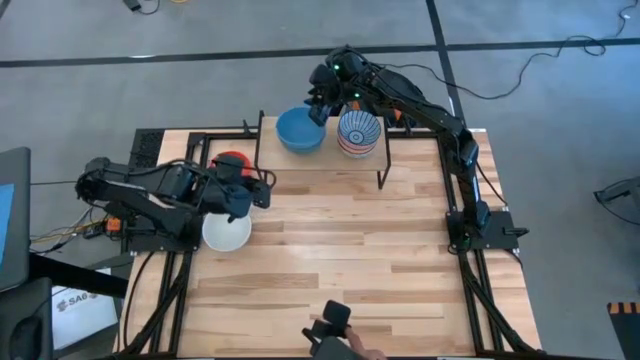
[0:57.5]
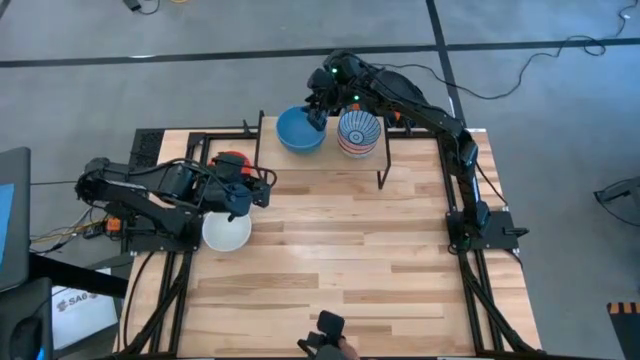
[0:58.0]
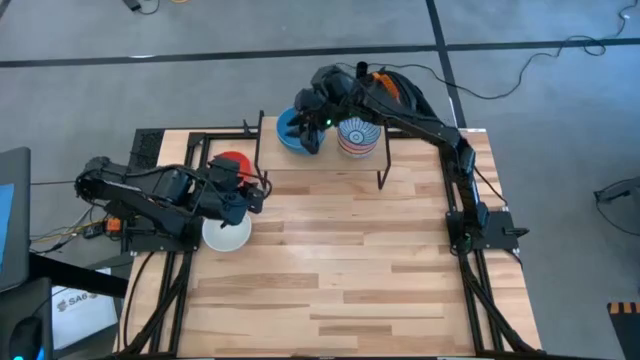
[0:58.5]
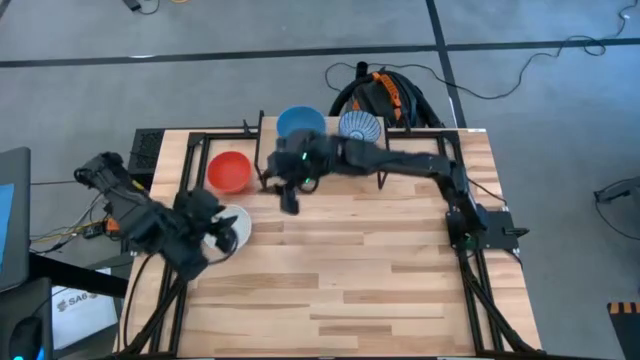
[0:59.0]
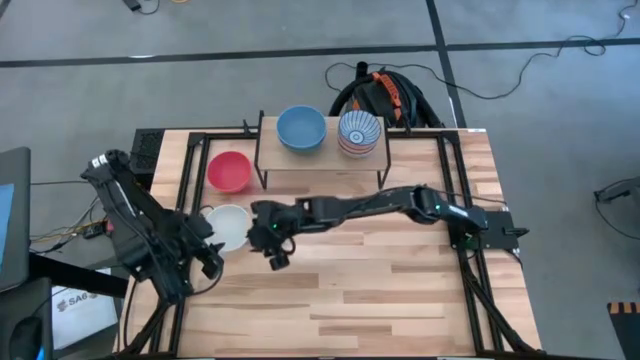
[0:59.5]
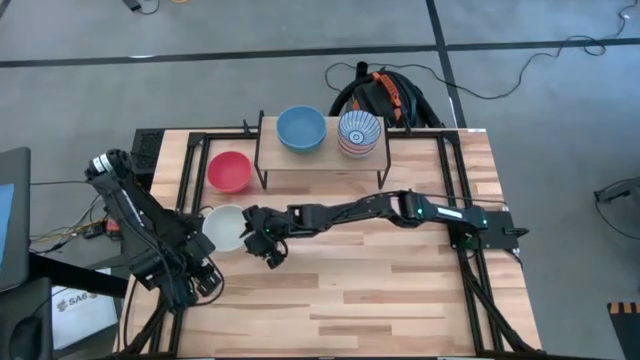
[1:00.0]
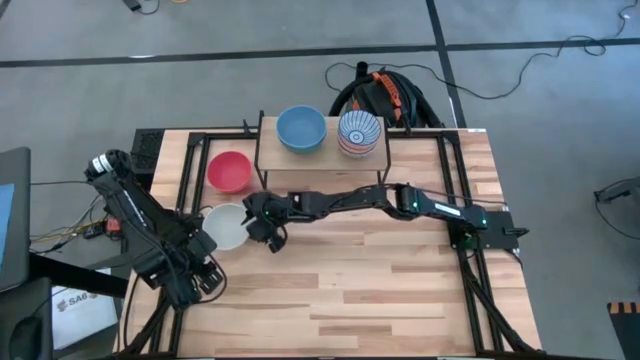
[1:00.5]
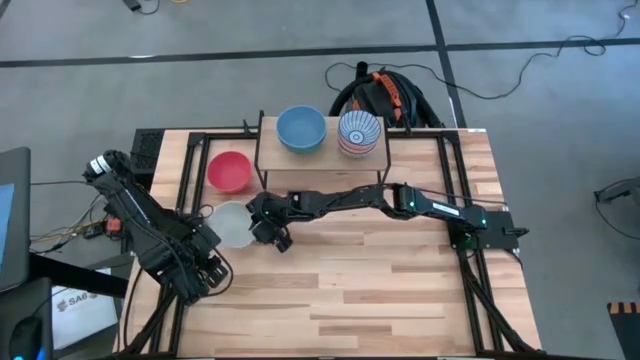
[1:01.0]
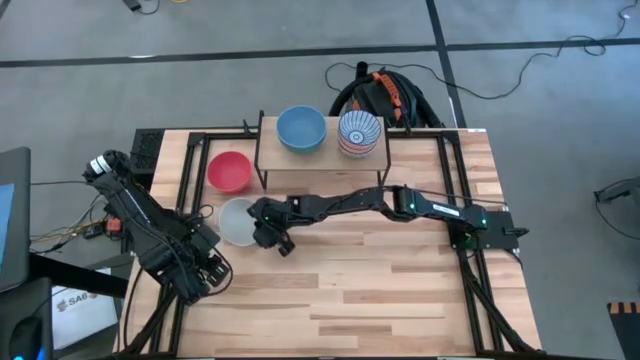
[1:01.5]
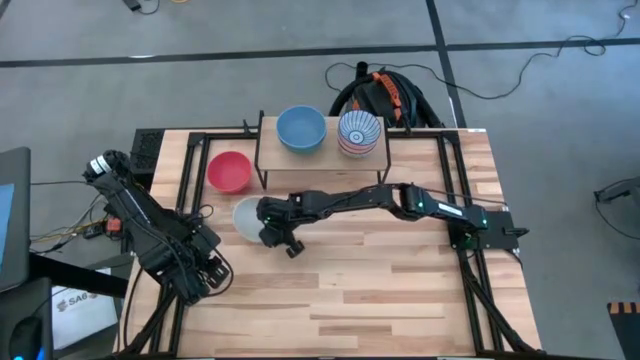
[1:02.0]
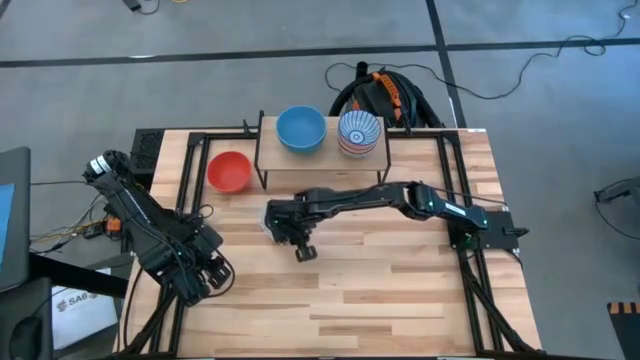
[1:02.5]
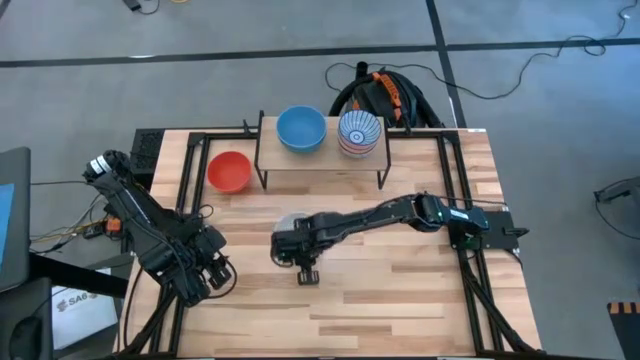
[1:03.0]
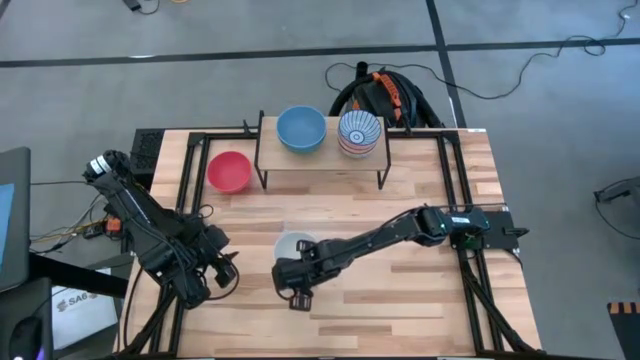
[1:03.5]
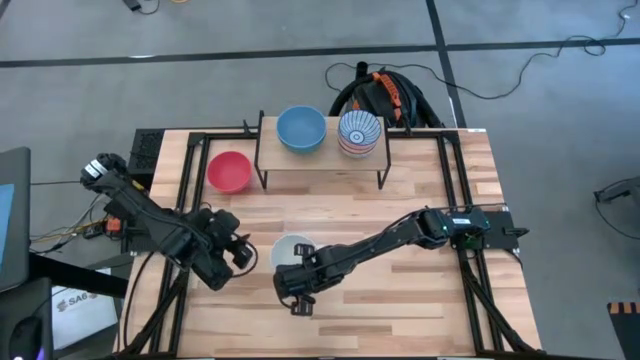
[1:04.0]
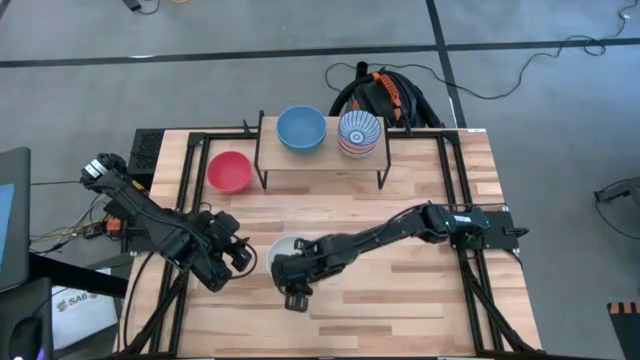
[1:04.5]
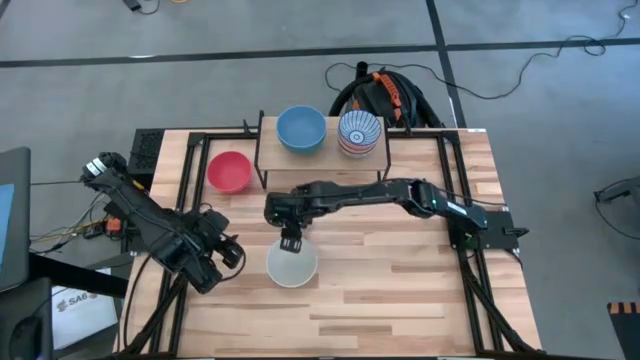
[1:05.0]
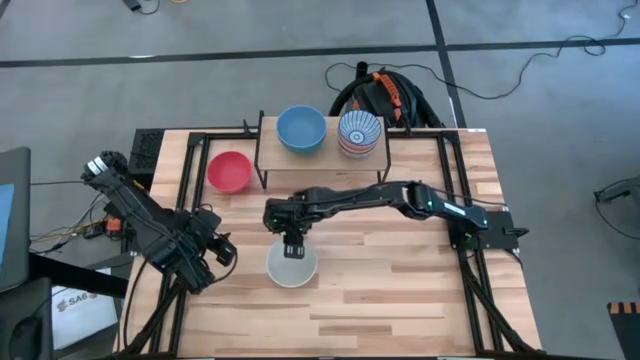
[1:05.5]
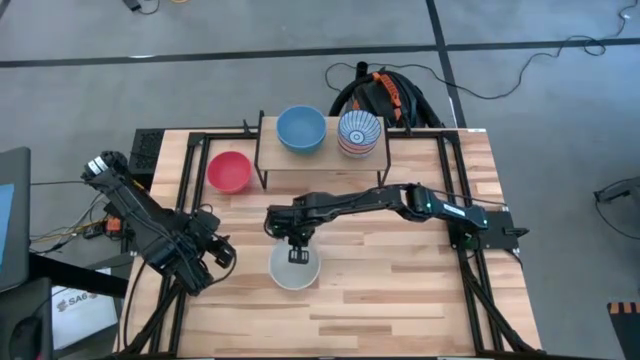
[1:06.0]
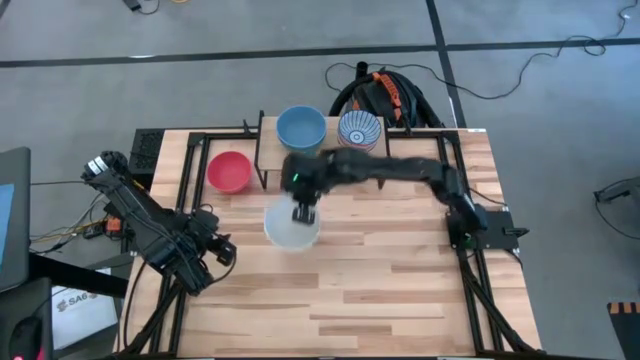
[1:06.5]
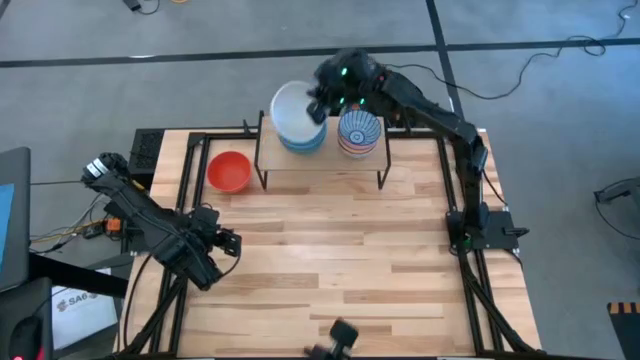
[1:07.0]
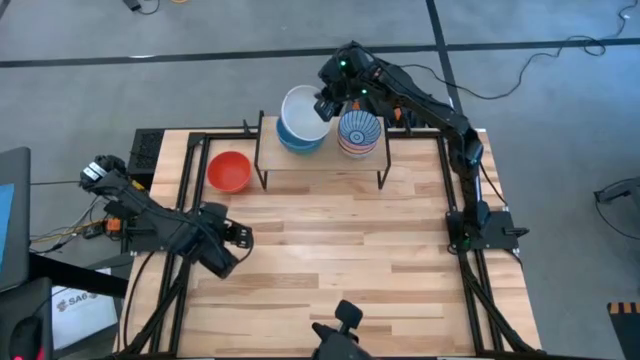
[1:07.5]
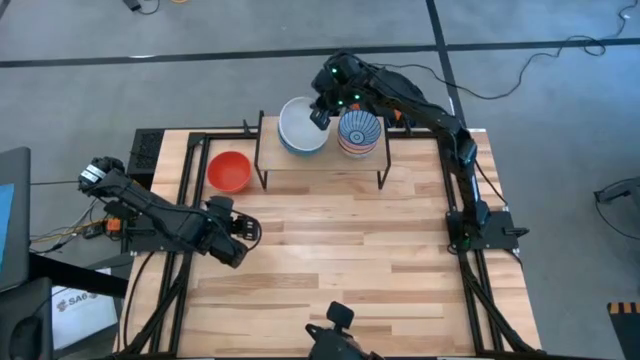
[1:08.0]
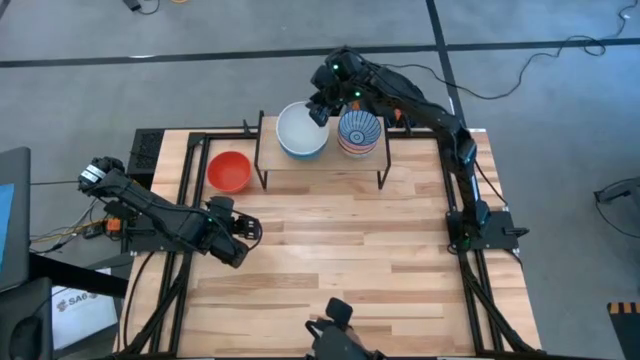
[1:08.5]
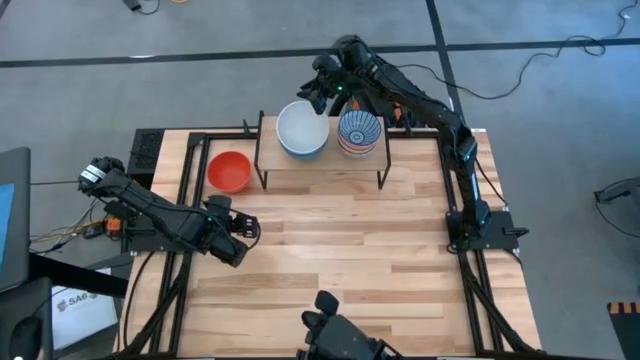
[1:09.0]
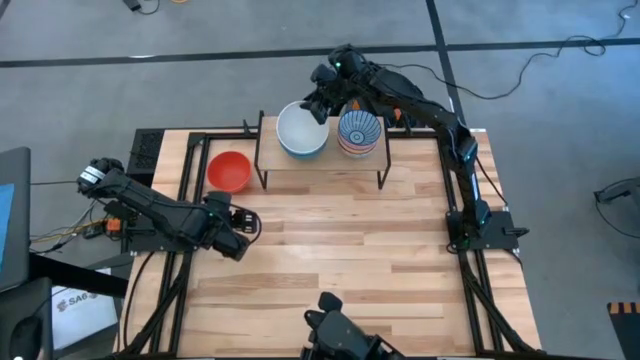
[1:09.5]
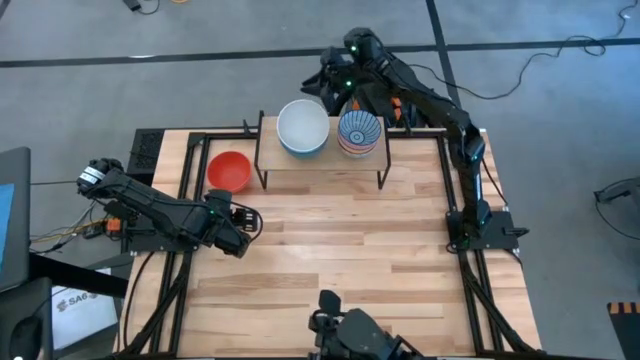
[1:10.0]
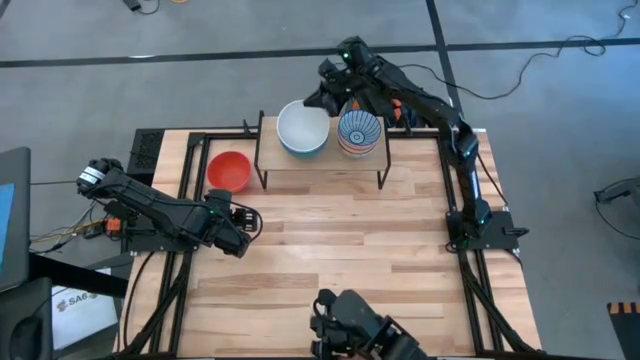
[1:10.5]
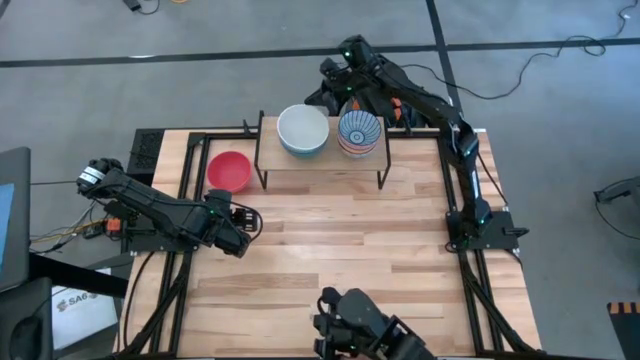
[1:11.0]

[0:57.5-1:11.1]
Task: Place and stack bowls onto a shelf
Stack the white bowl on top of the blue bowl

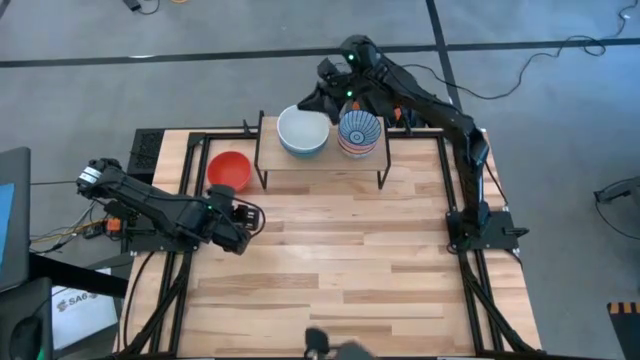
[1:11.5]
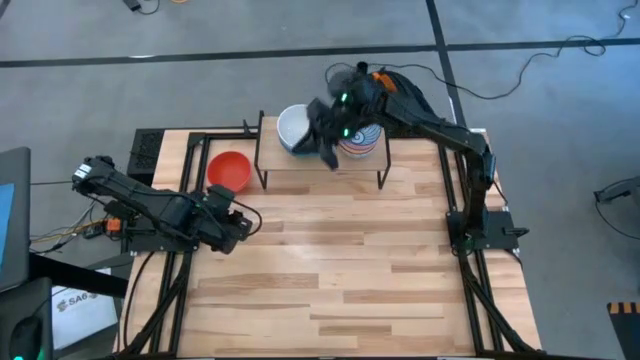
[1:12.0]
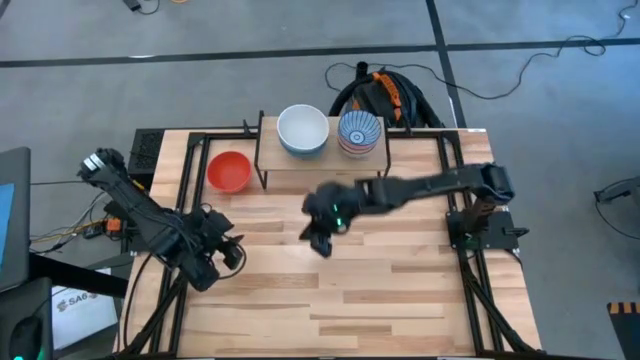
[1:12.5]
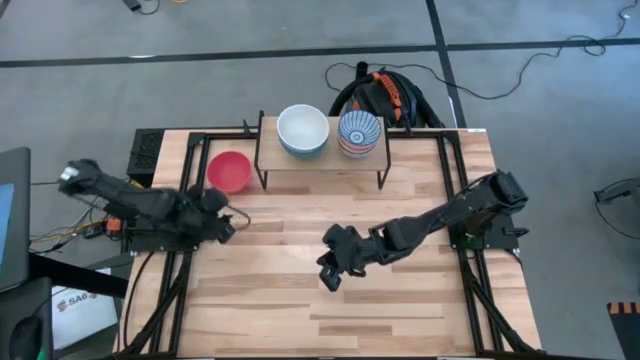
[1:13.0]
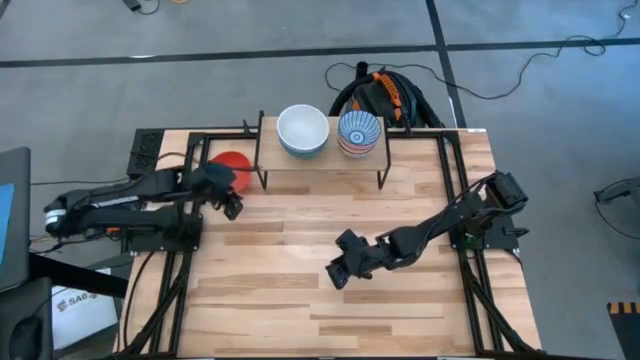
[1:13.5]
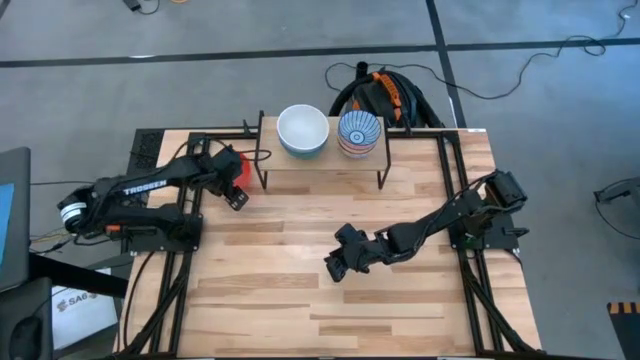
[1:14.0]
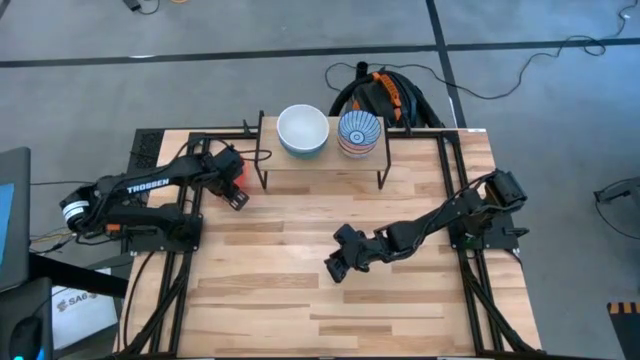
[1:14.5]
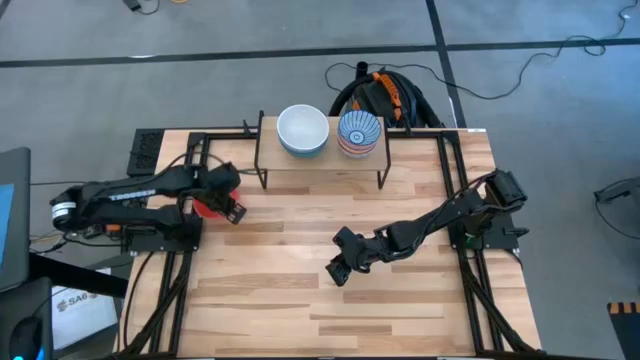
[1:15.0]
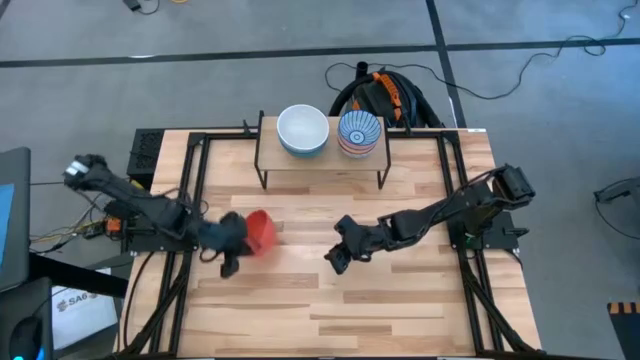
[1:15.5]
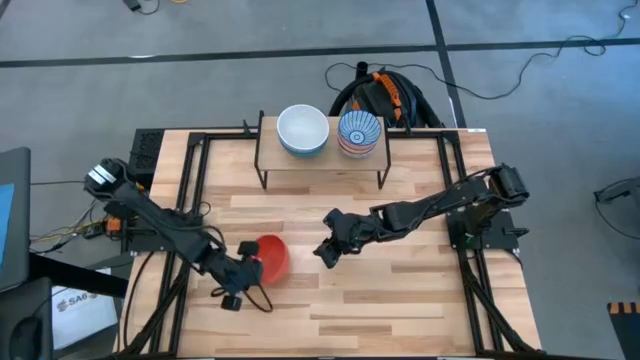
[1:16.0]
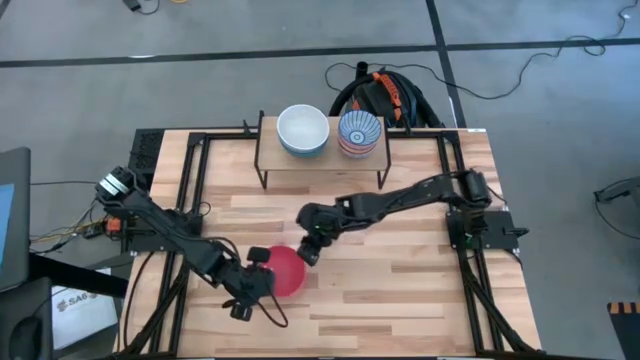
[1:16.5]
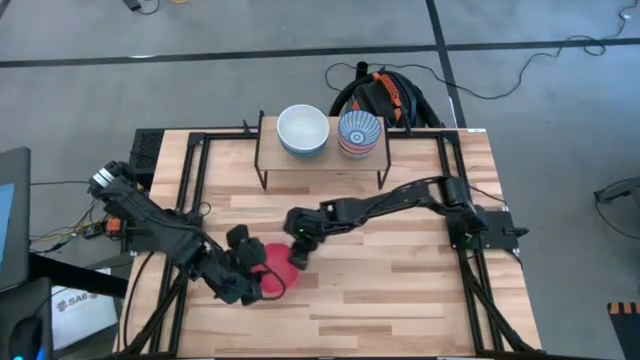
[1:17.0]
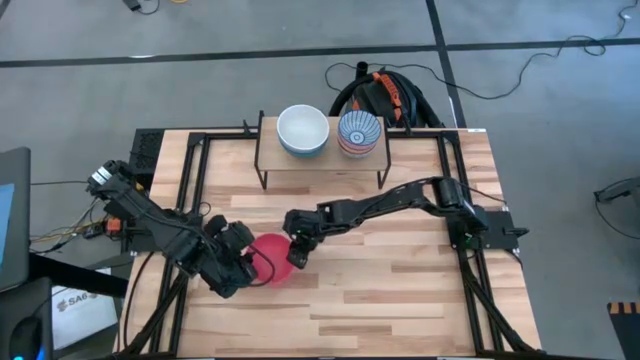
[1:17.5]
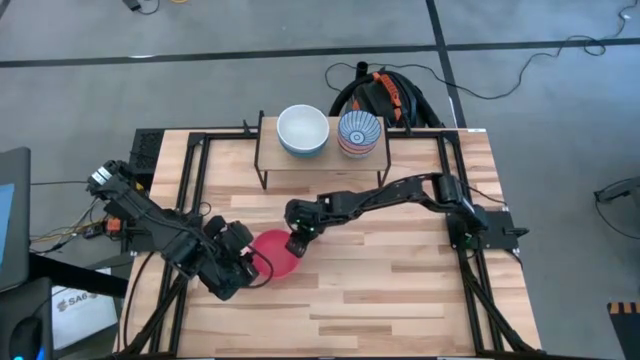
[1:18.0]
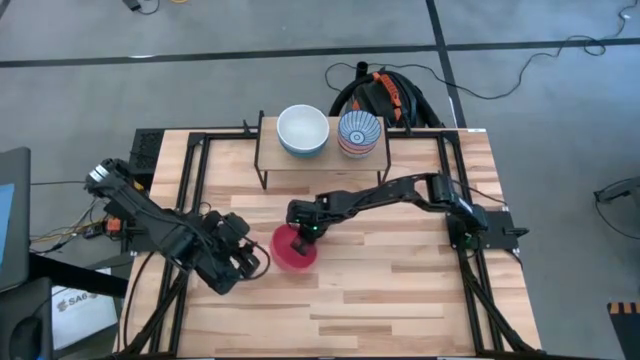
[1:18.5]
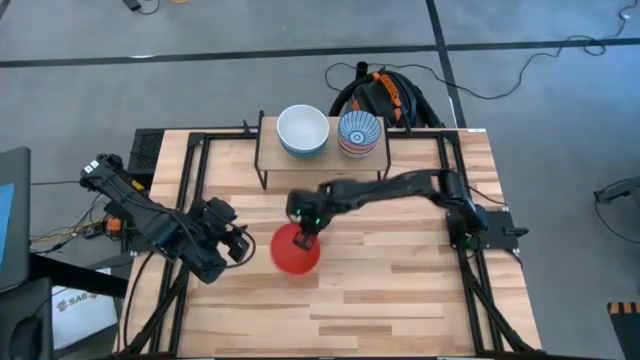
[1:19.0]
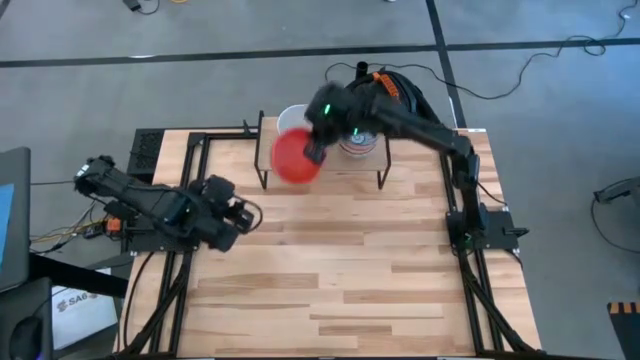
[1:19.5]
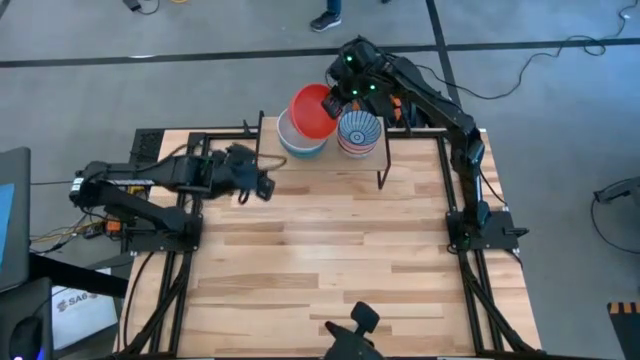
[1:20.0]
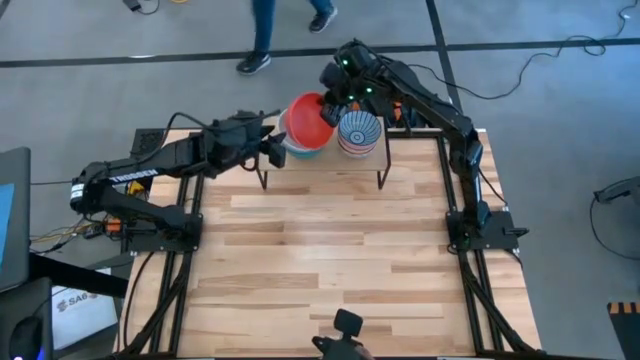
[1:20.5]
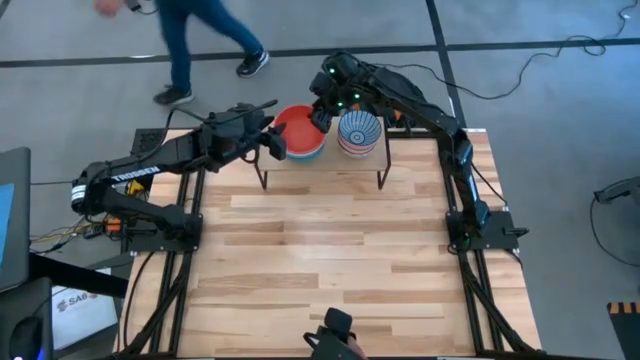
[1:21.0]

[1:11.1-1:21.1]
Stack the orange bowl on top of the white bowl
